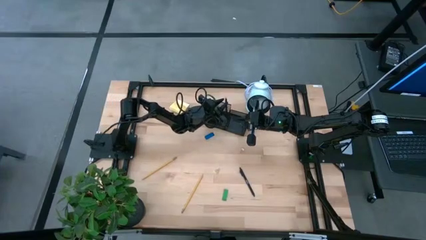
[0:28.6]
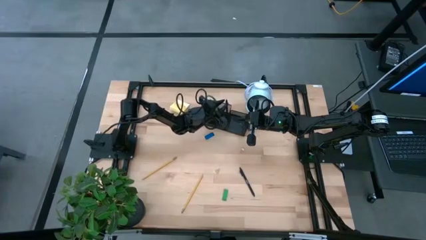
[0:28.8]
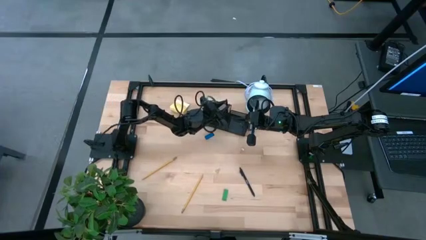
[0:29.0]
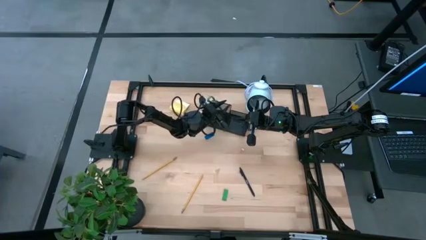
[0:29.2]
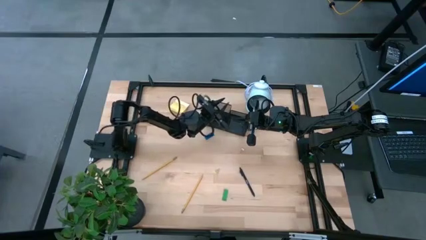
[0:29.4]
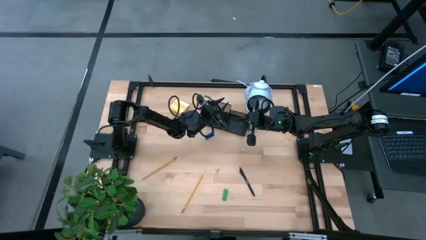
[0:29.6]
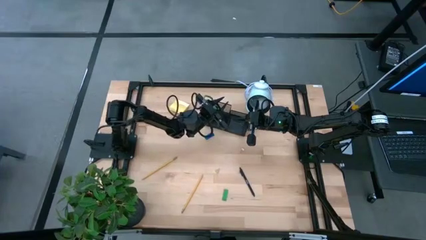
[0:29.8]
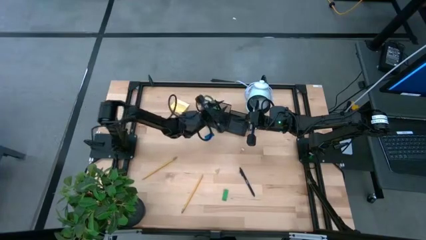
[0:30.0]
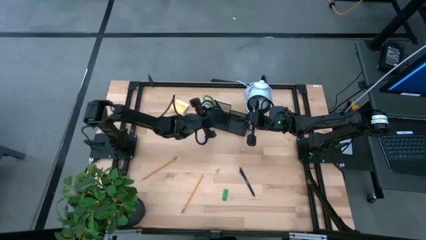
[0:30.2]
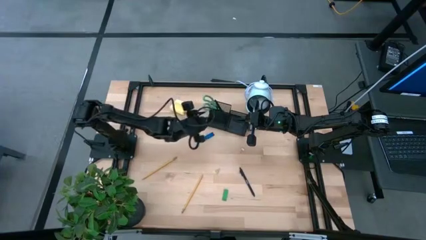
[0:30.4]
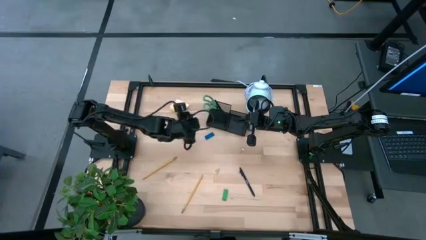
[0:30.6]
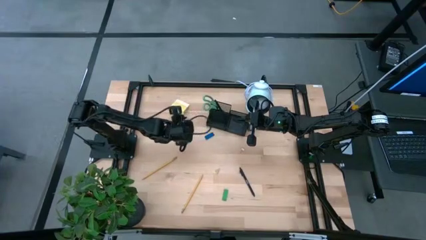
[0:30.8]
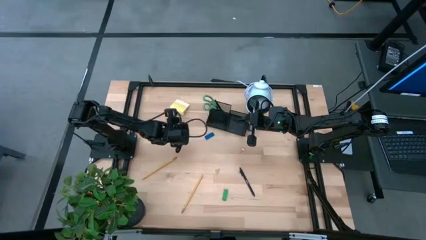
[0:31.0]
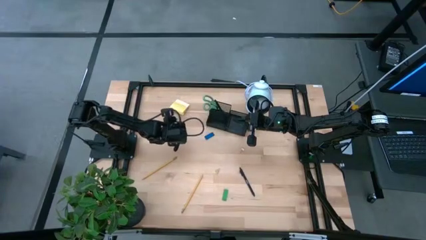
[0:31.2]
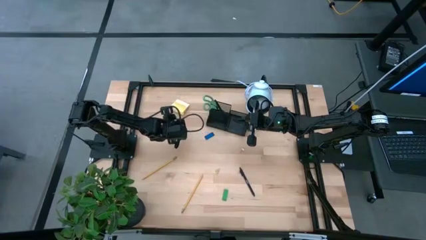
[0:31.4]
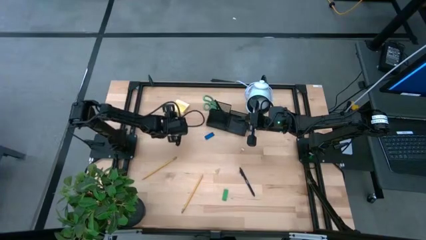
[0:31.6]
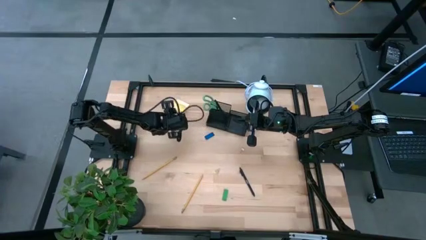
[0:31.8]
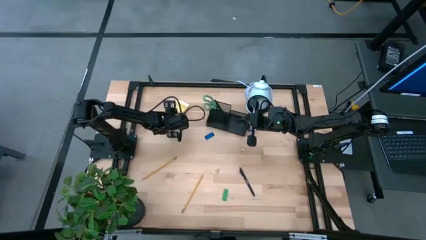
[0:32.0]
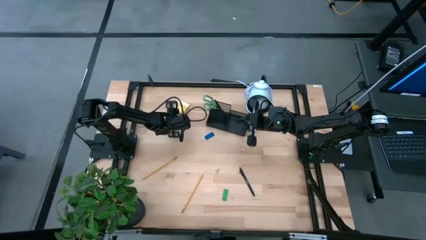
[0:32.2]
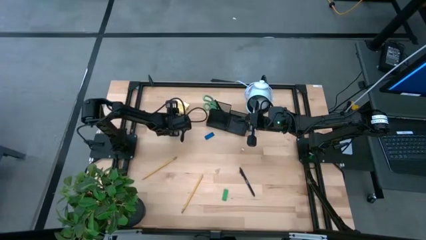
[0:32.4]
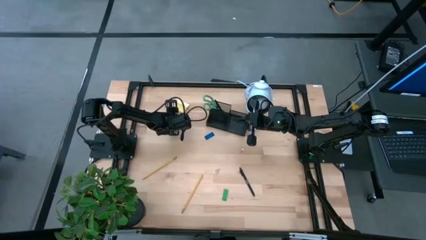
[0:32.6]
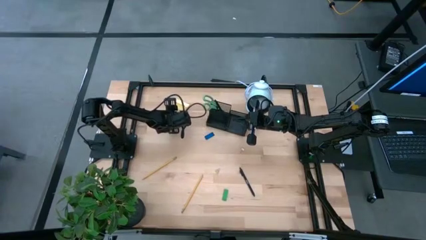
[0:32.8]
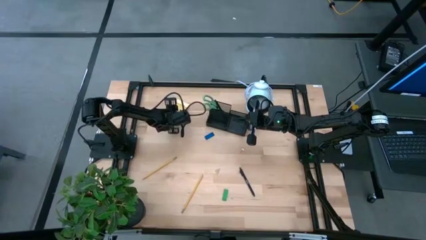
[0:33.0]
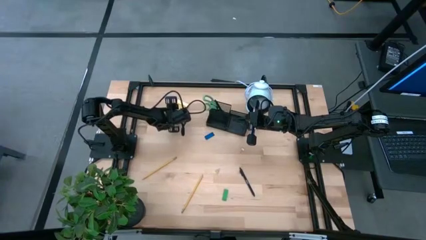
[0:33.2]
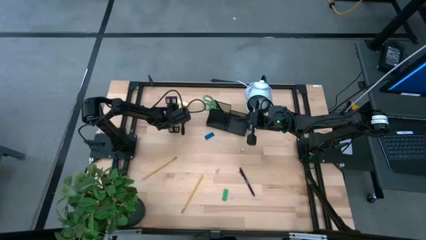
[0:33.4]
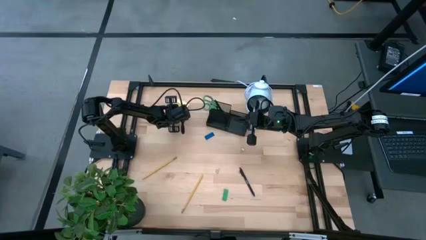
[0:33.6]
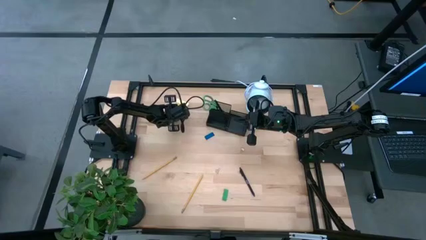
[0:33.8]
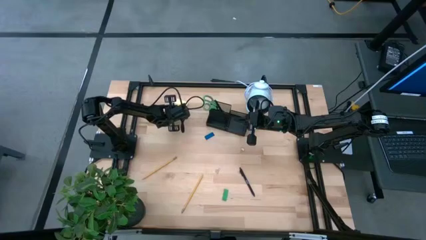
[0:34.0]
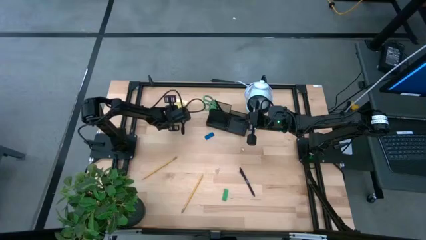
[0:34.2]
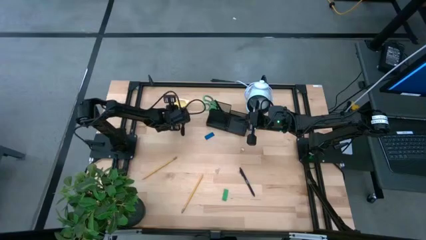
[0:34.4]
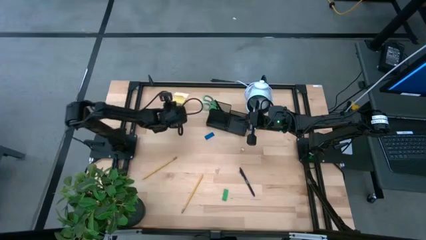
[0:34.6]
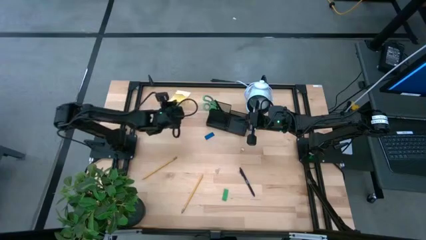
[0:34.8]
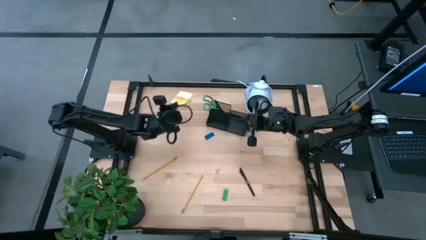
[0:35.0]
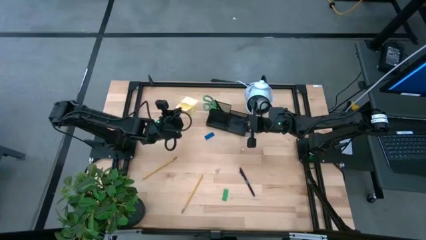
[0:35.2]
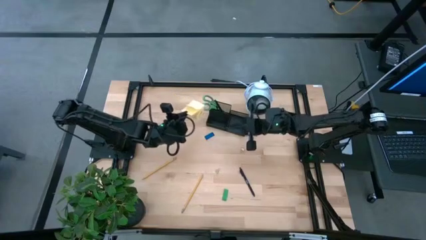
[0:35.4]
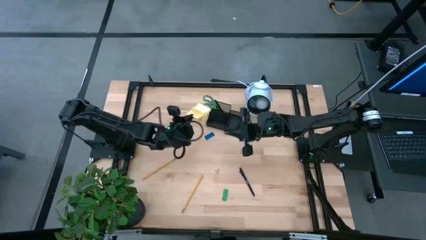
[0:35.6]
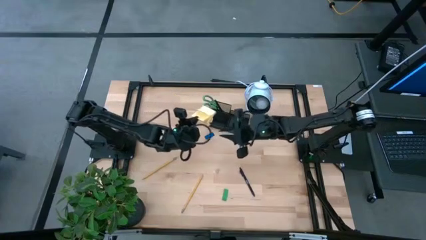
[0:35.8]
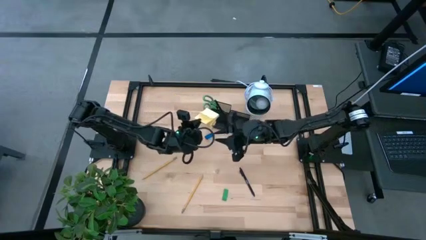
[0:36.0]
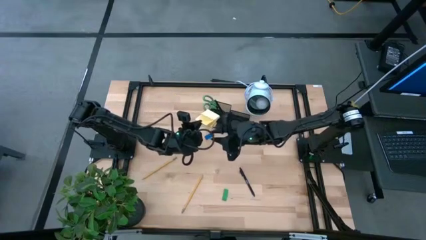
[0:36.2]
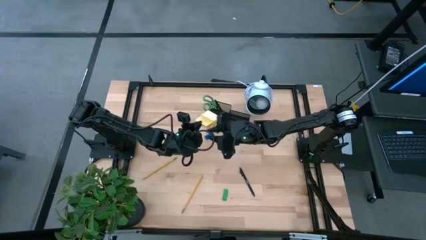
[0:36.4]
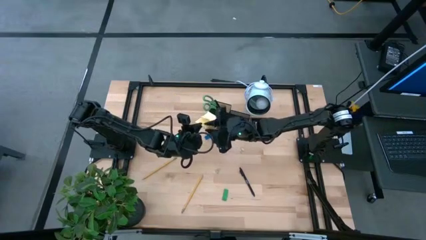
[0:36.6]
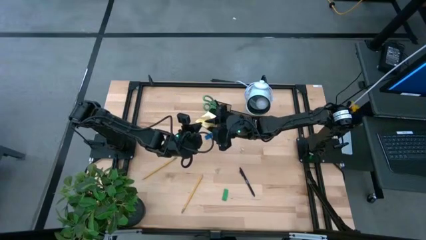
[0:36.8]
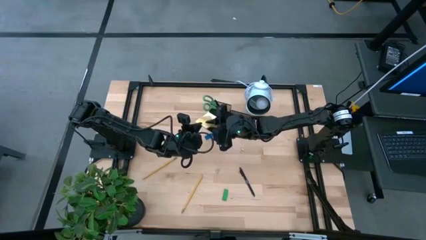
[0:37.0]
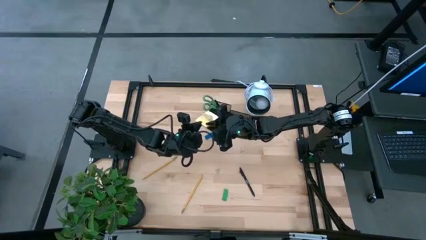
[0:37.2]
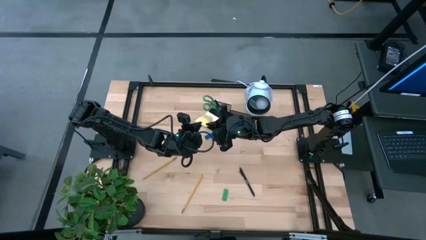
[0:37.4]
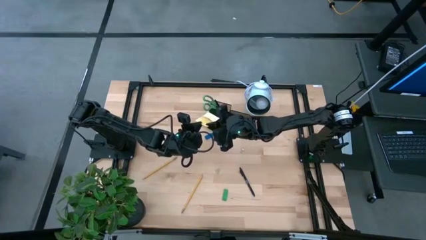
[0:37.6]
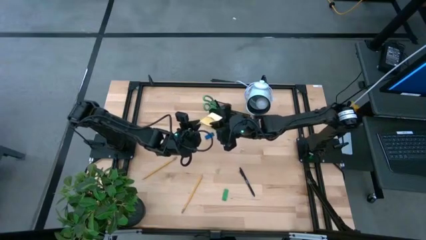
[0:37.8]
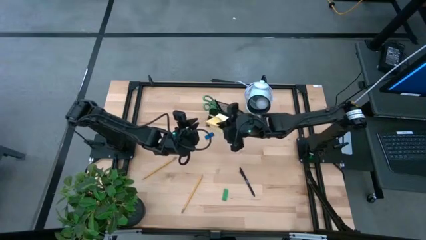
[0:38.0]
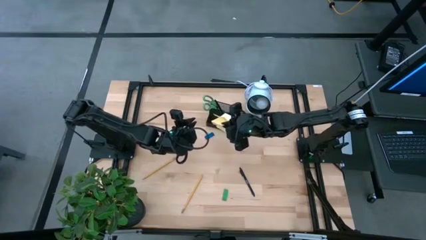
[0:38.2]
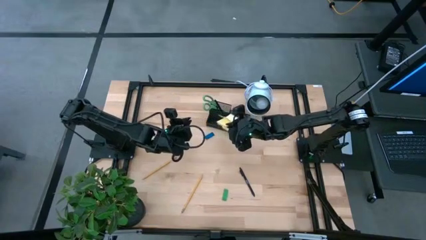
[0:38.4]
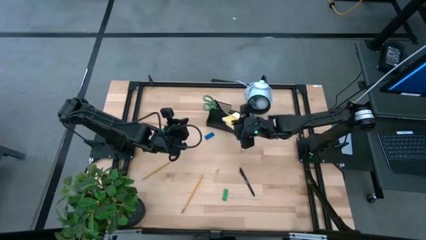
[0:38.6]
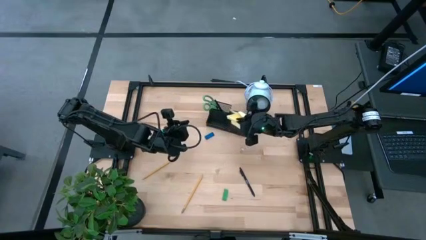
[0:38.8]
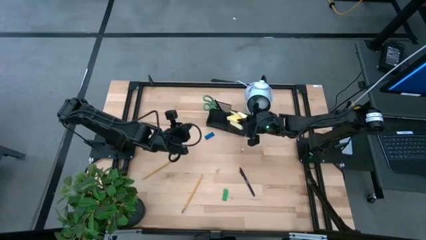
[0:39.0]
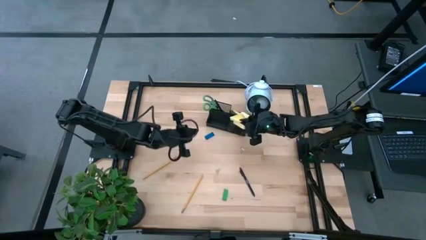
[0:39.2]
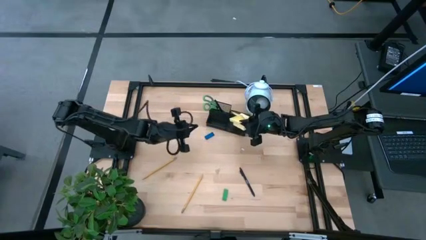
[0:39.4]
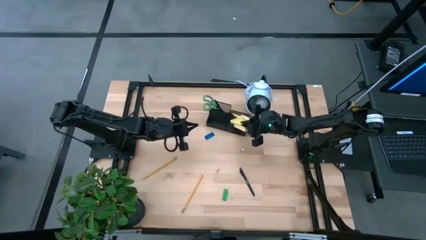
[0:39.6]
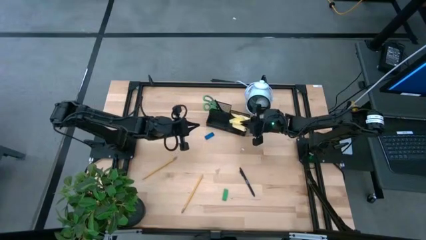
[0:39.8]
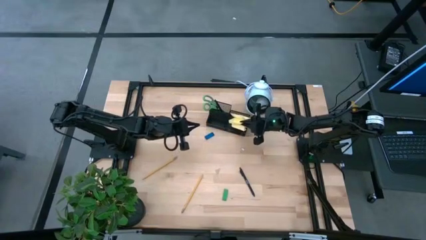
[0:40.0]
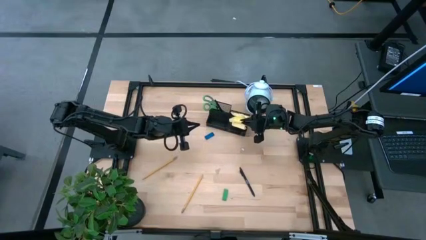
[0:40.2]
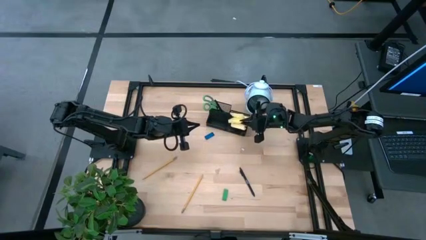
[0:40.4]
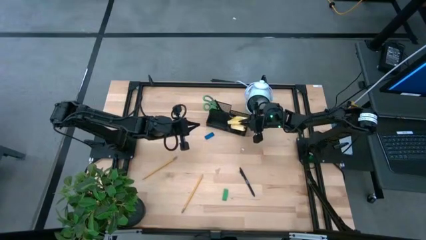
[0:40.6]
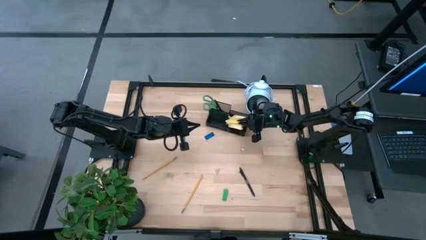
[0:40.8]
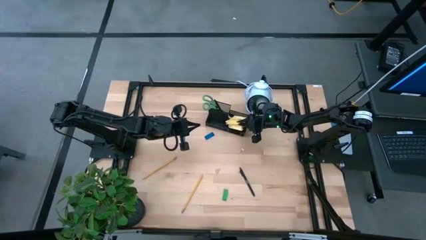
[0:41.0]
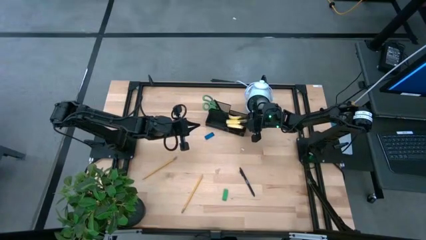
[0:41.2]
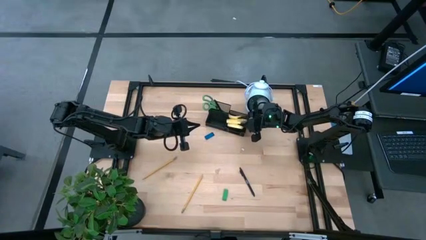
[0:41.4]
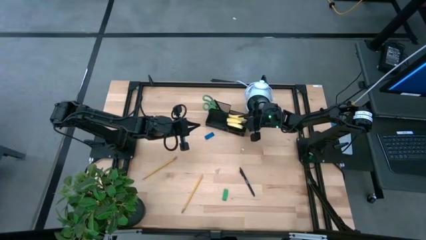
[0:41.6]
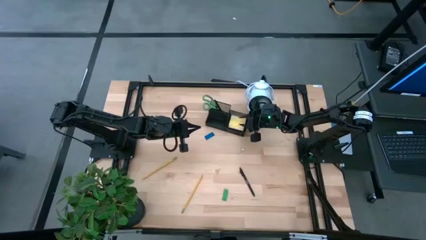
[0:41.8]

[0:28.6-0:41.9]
Task: Pick and place office supplies into organizer
Put the yellow sticky notes into the black desk organizer

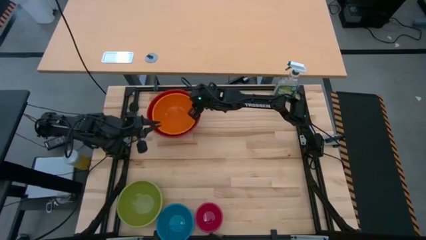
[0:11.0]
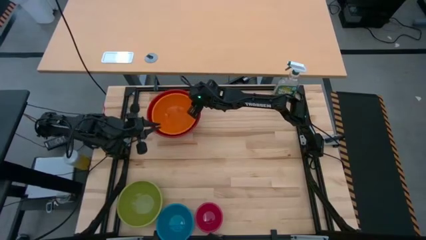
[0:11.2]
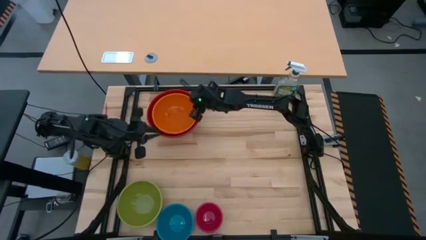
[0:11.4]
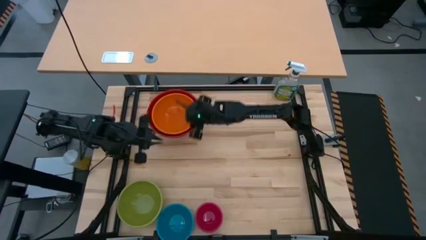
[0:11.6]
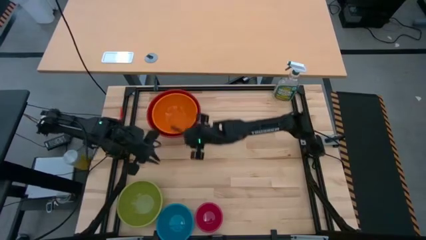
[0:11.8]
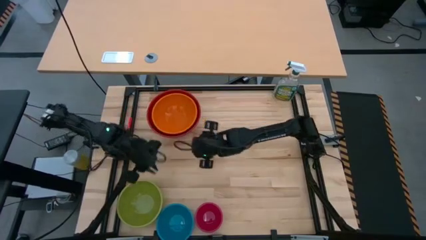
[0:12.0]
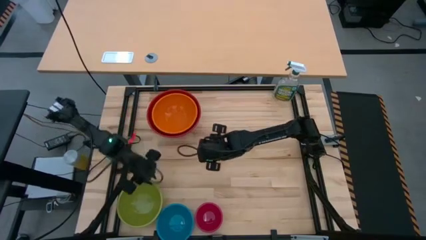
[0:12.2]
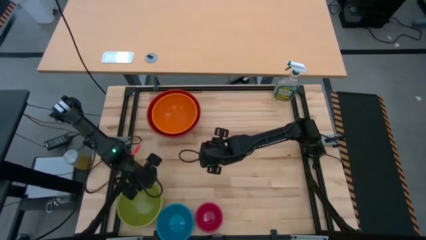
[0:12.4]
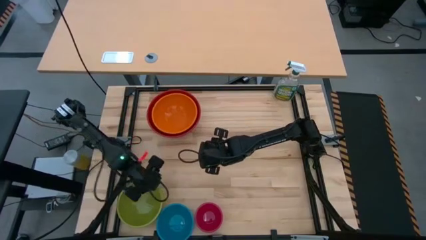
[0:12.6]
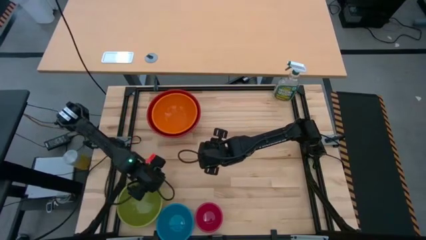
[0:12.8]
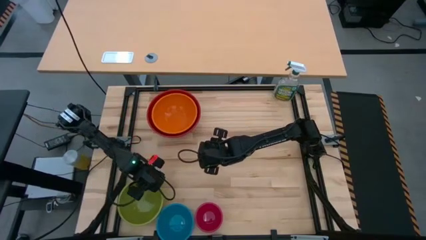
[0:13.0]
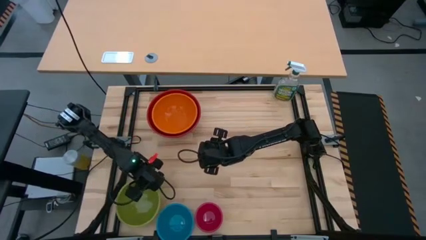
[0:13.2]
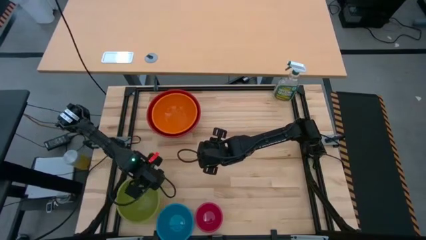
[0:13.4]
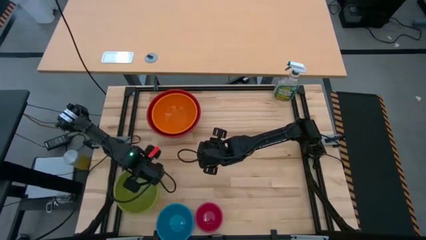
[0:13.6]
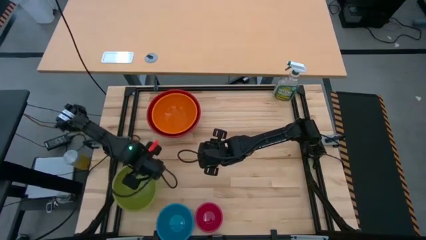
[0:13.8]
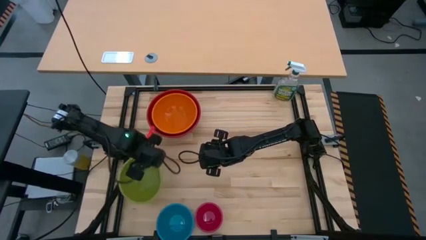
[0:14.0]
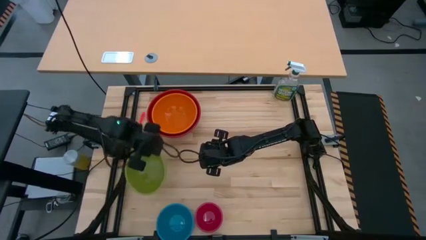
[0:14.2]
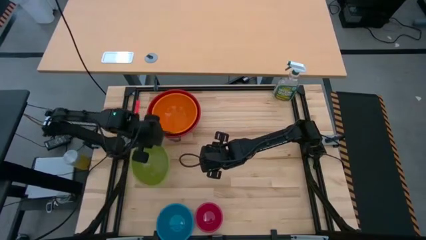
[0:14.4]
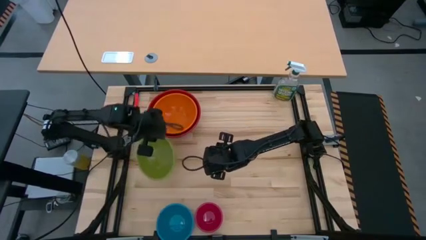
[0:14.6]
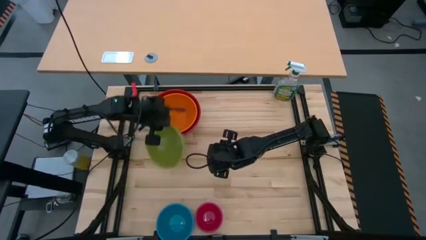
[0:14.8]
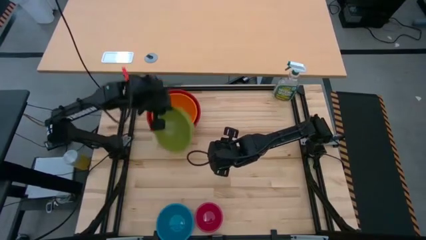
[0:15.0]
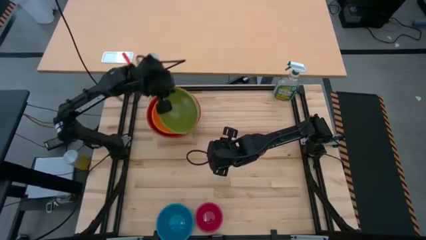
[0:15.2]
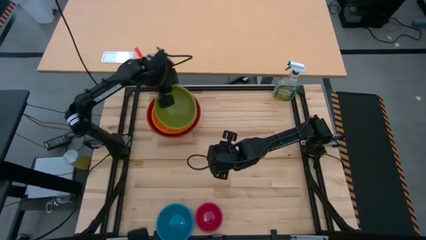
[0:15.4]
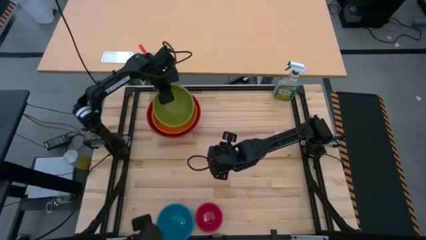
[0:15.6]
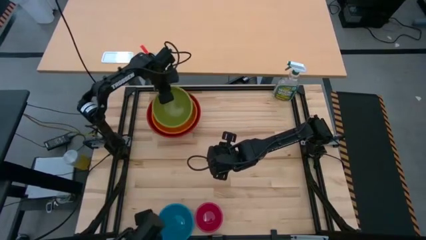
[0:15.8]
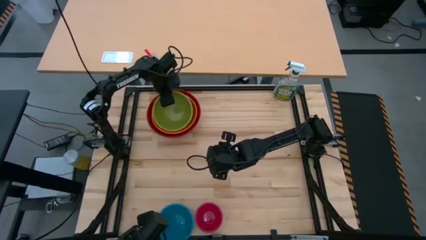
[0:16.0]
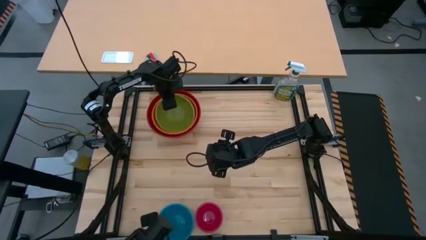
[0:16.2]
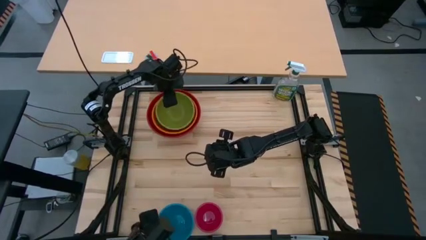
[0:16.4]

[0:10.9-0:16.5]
Task: Nest bowls inside each other by size order
Stack the green bowl on top of the orange bowl
